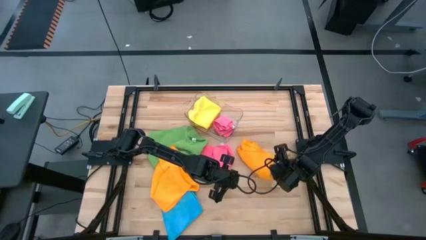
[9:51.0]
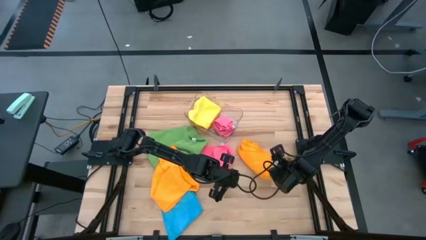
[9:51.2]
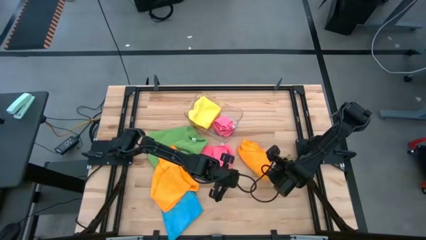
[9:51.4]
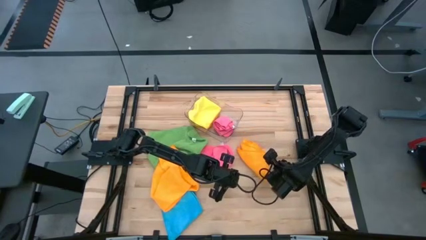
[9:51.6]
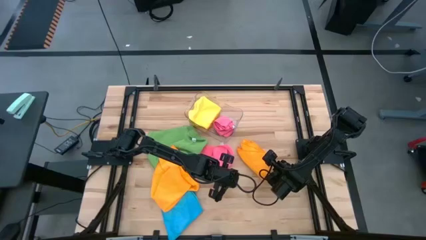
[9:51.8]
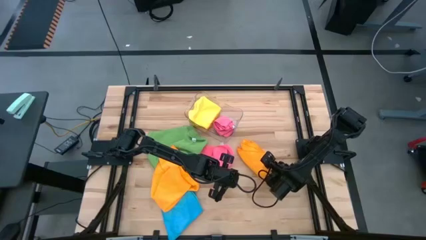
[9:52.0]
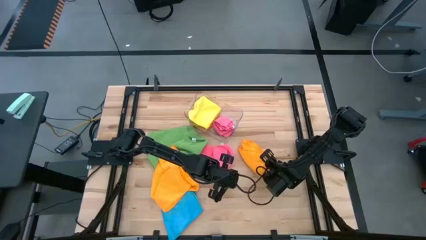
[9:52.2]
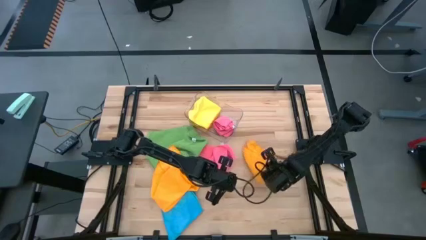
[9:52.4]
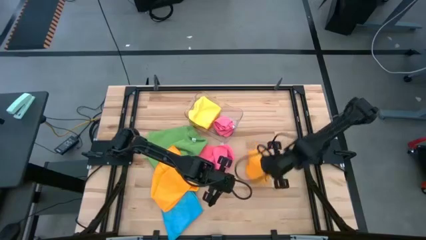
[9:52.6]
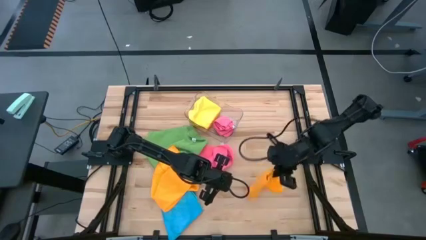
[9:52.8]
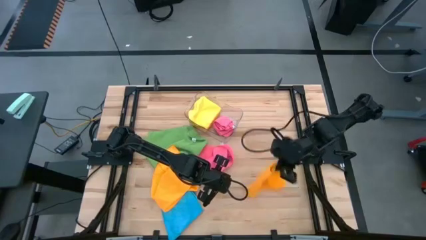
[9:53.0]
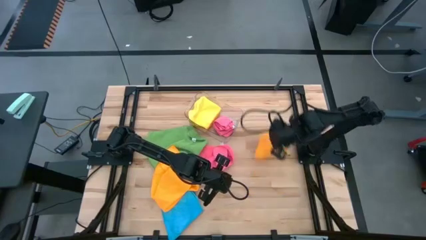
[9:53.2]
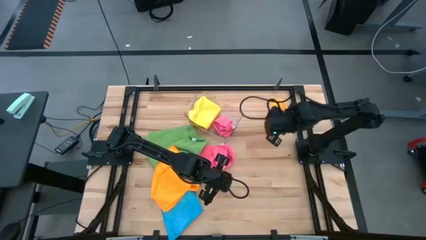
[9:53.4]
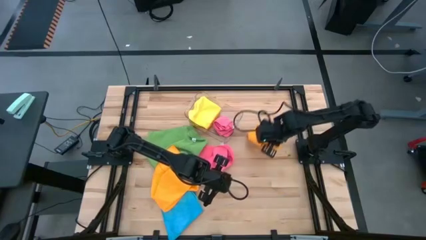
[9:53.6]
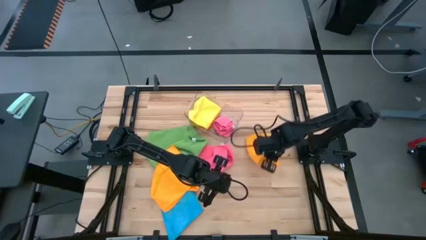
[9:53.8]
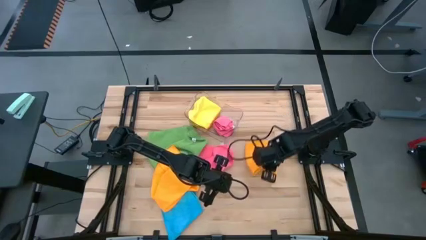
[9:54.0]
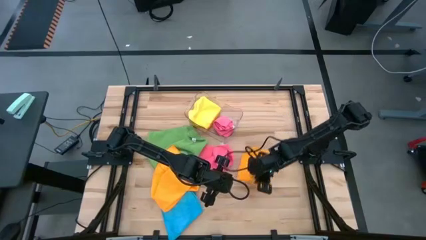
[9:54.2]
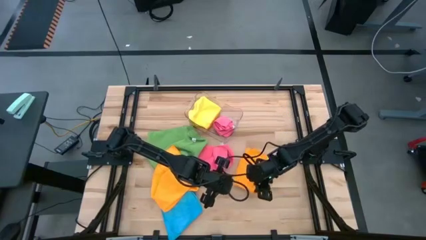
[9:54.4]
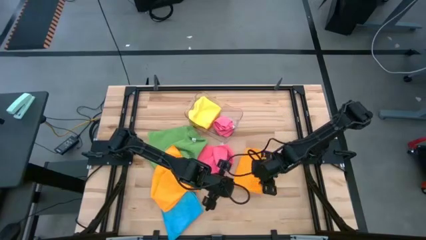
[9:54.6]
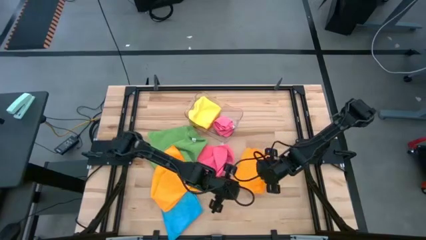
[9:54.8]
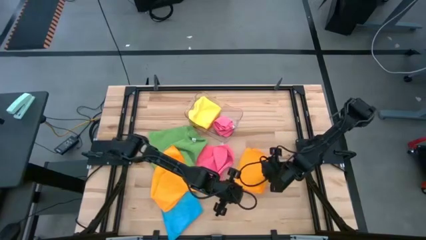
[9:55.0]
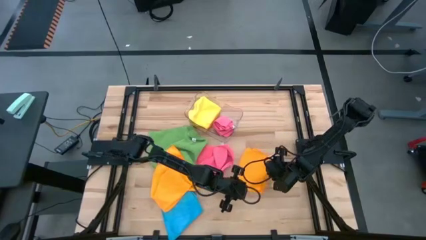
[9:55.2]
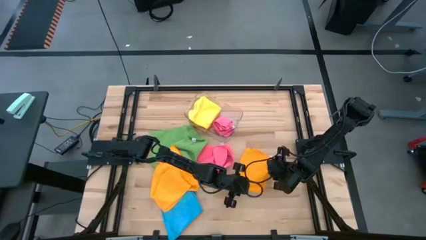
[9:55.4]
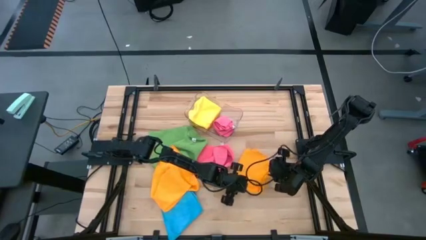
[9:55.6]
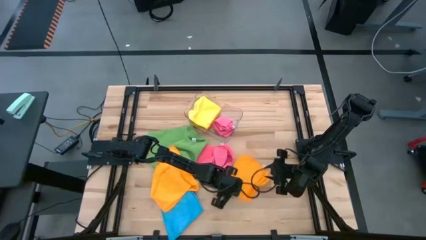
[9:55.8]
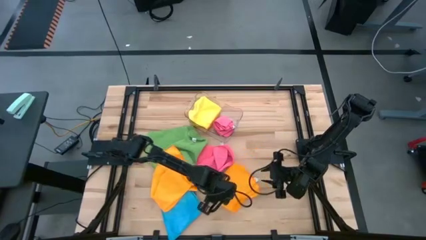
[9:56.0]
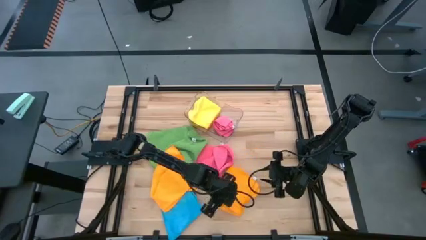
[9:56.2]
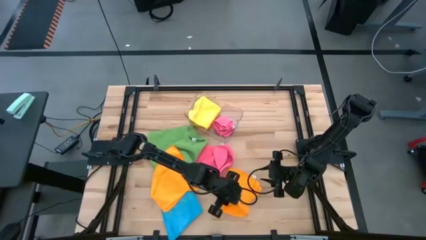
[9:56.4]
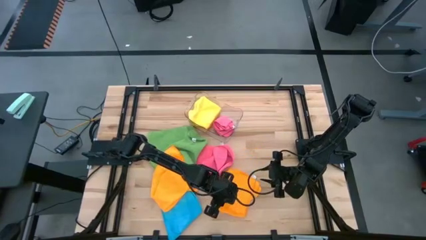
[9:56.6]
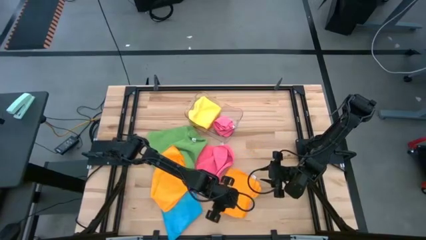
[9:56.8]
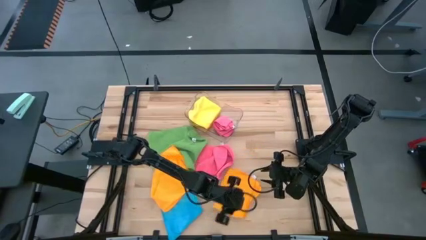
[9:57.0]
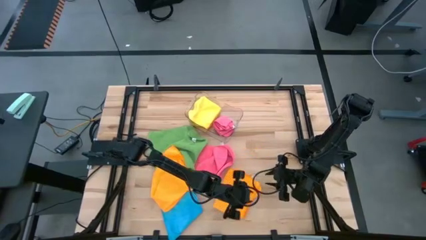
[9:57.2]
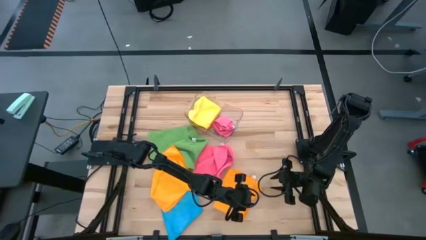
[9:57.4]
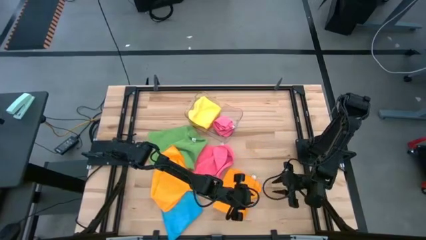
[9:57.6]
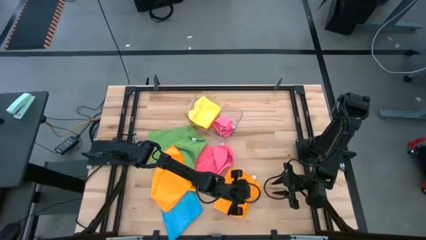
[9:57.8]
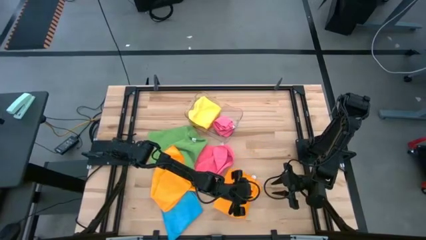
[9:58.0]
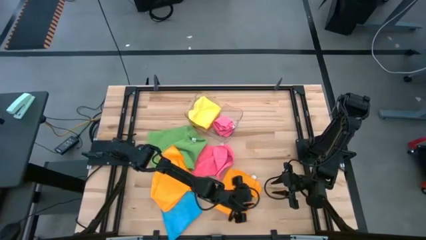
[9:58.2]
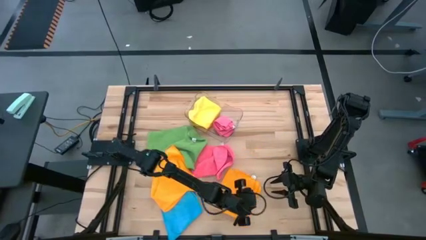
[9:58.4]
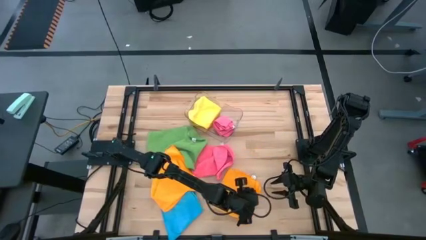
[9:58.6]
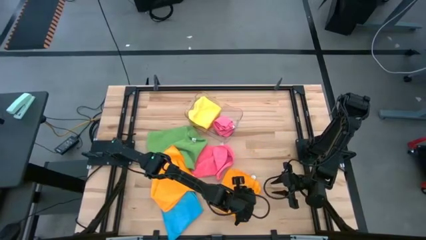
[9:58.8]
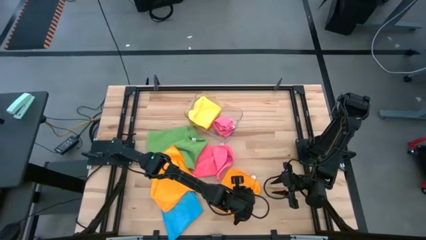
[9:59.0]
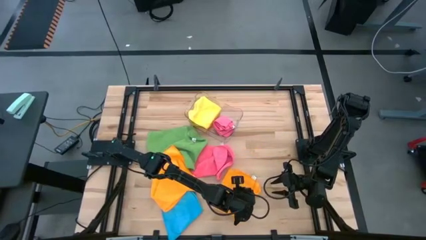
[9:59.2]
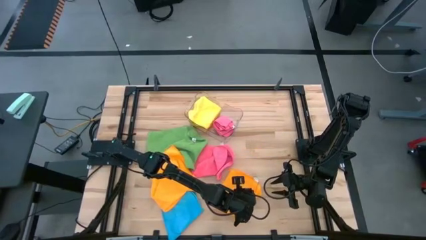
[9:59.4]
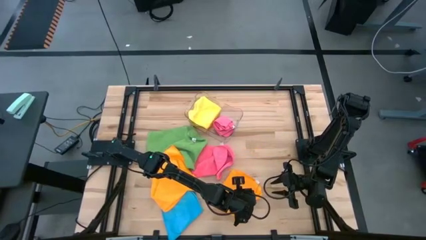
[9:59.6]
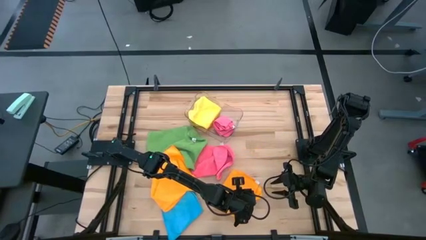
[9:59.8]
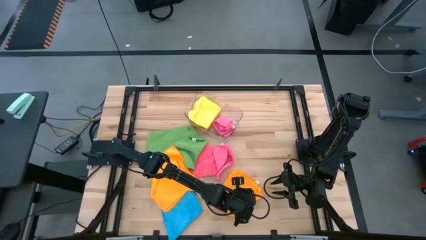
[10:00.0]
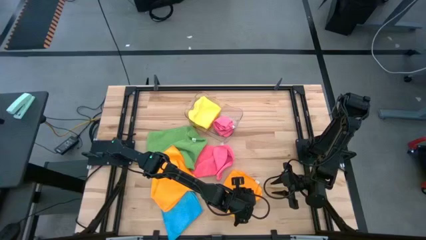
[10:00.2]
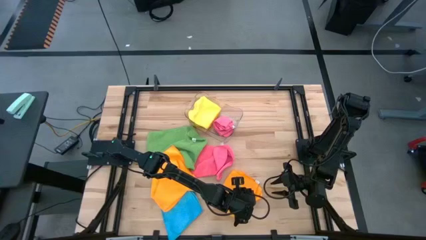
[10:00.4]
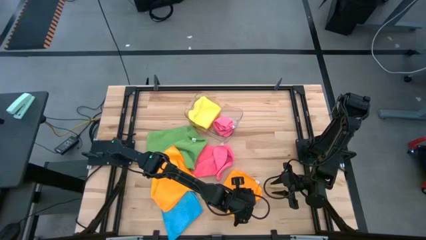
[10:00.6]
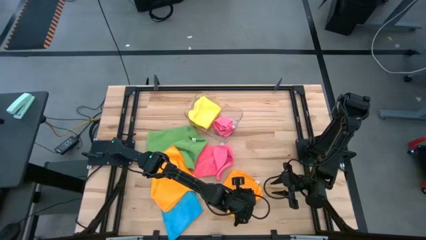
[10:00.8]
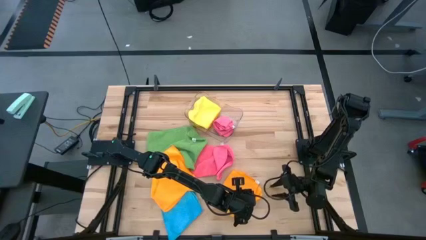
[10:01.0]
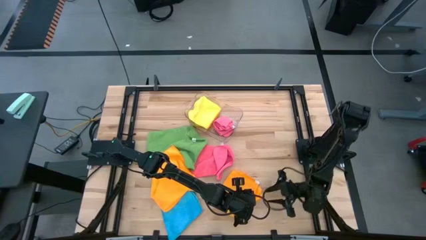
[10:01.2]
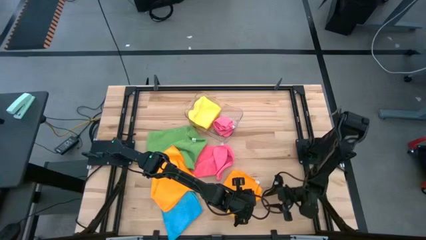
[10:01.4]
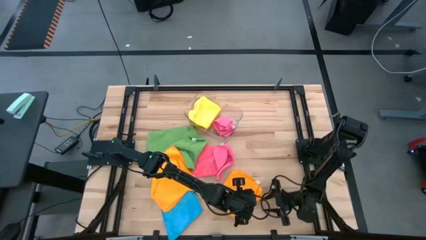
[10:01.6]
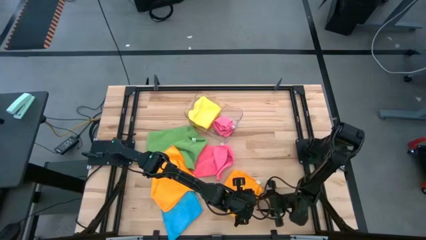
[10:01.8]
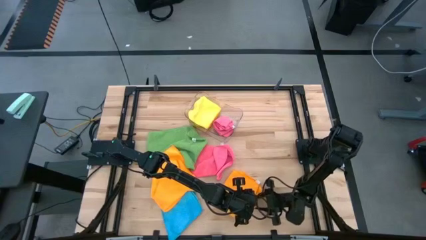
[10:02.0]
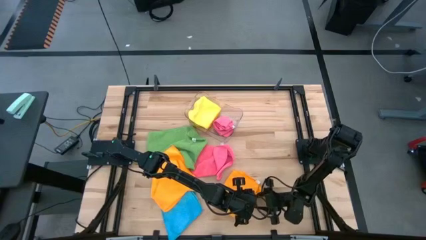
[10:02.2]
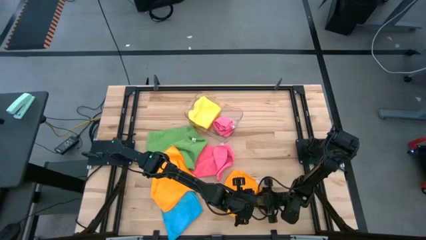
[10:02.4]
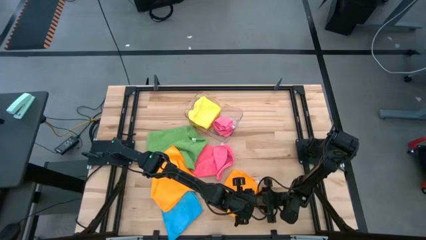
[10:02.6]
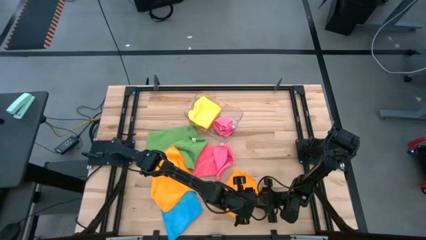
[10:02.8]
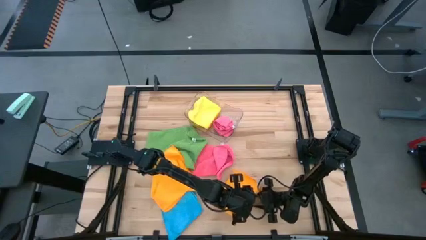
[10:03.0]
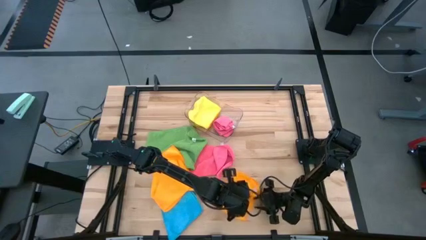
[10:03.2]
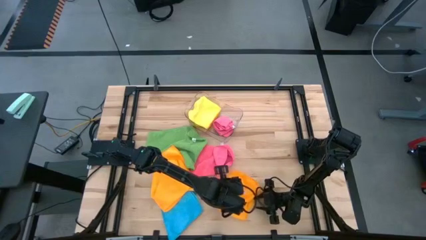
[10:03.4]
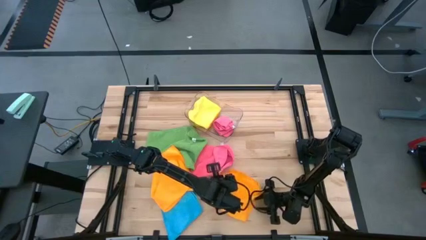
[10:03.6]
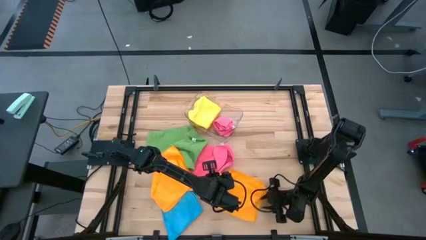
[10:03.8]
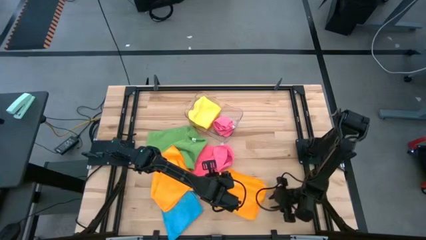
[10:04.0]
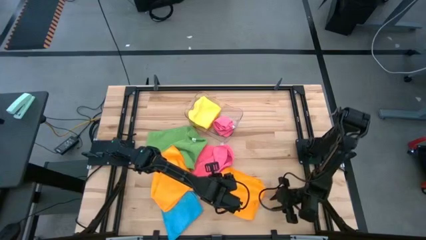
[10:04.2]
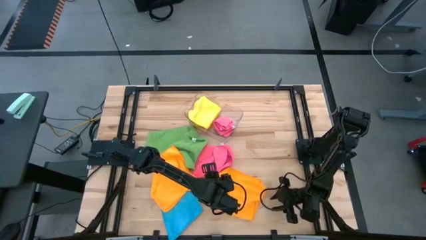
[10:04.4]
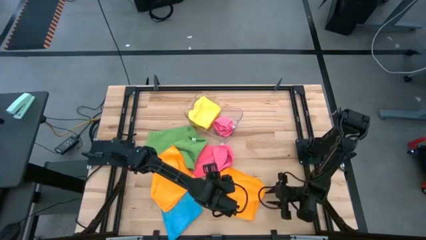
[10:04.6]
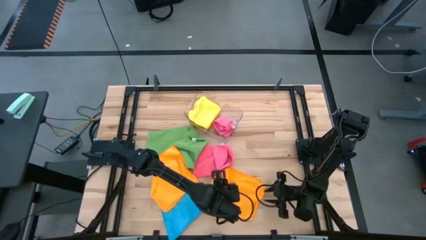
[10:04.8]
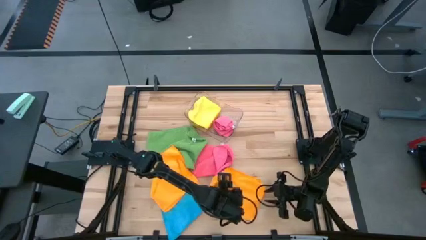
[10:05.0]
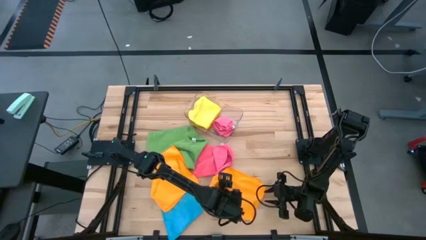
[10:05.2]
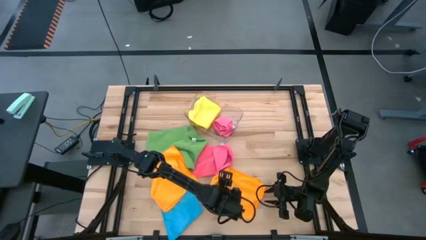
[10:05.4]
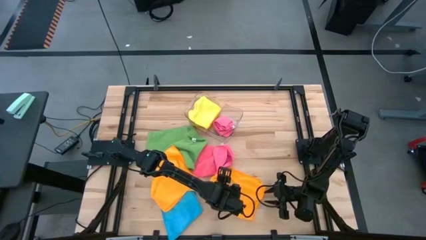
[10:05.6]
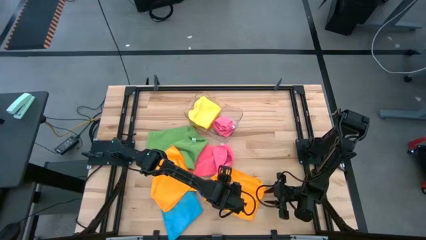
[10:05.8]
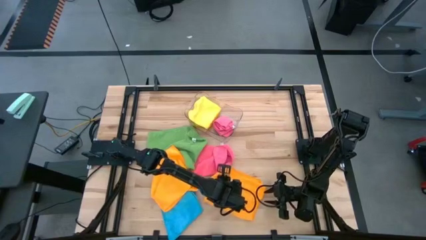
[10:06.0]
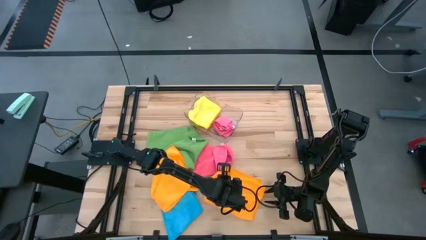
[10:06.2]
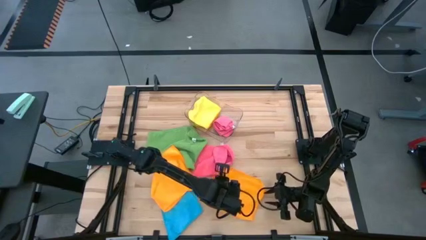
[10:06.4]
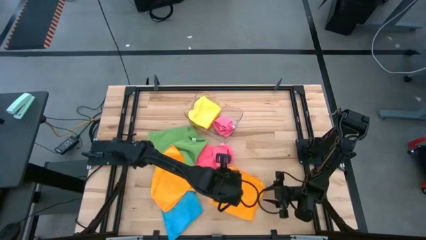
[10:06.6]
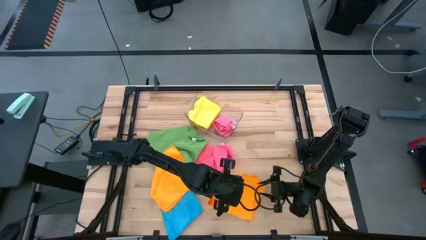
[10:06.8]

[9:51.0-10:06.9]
Task: Fold microfiber towels
Fold the right orange microfiber cloth
